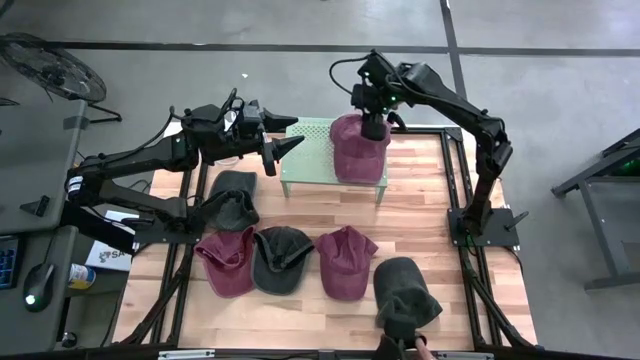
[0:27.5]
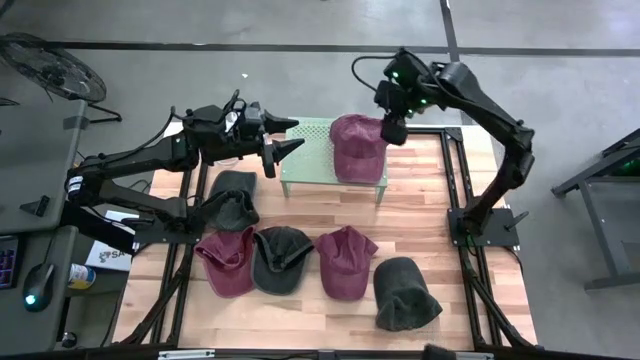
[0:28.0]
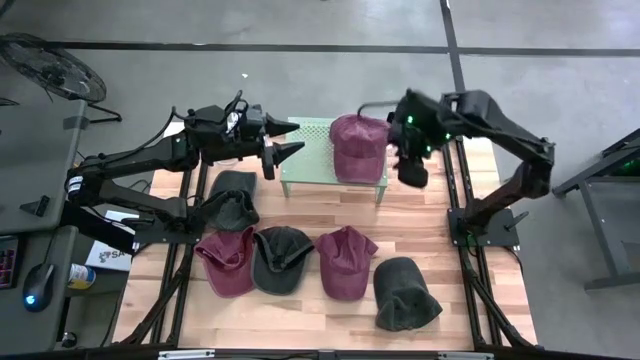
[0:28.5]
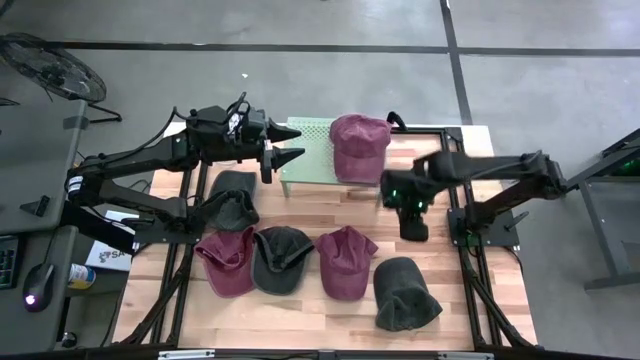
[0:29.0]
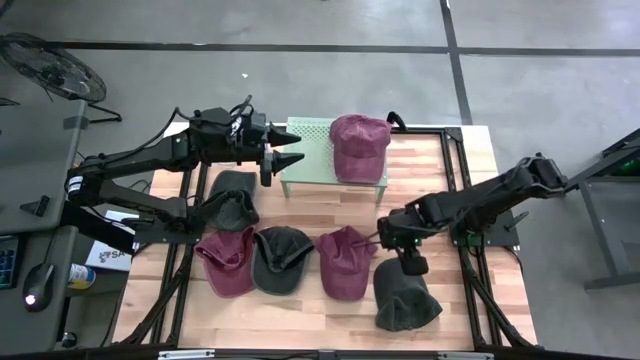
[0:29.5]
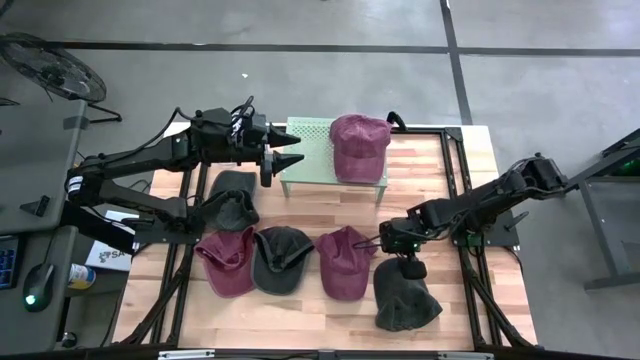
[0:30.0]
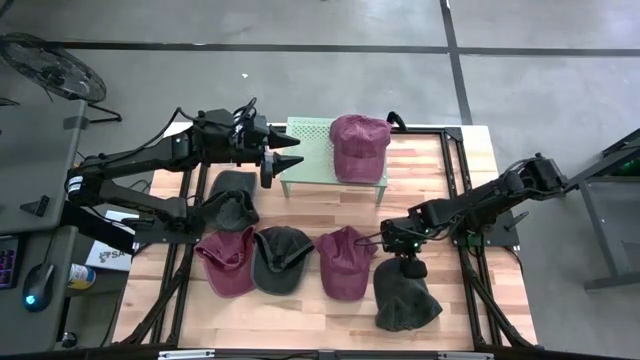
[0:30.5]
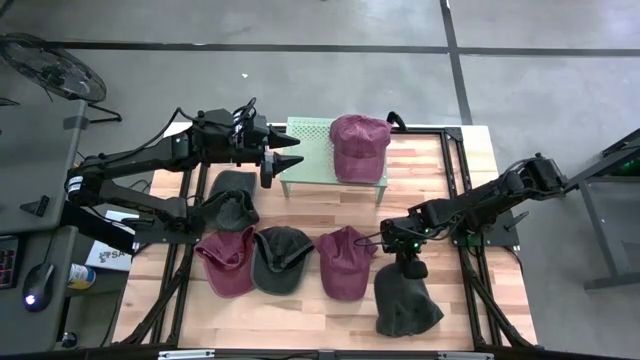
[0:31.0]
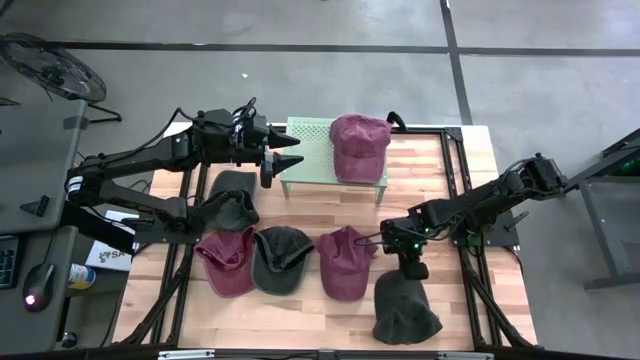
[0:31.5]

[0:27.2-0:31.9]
Task: Pick & Place hat
Put the bottom right black cap on the shelf

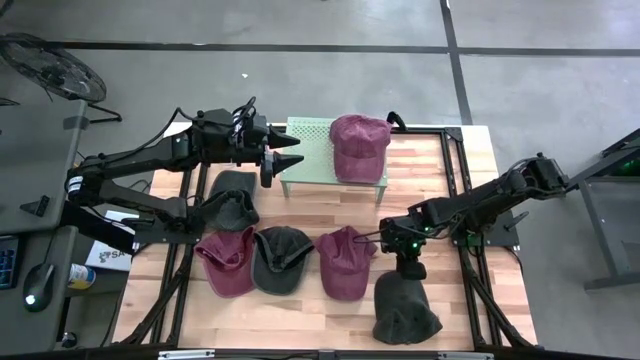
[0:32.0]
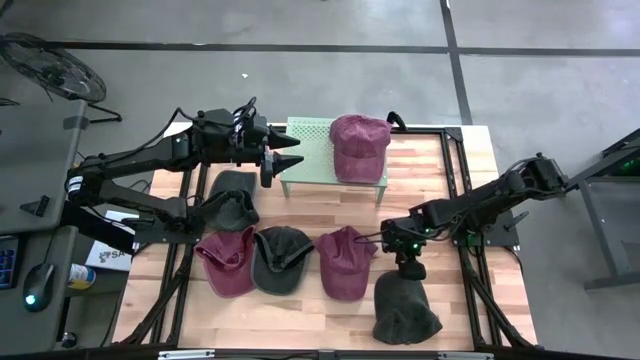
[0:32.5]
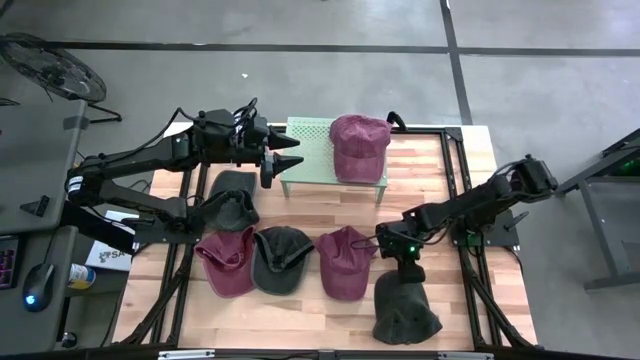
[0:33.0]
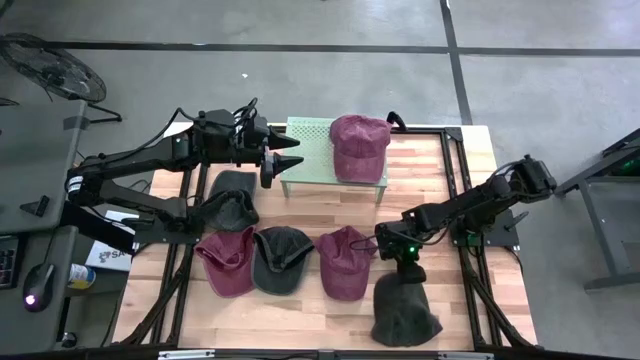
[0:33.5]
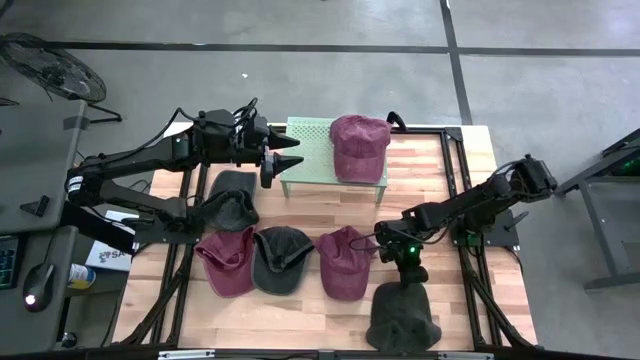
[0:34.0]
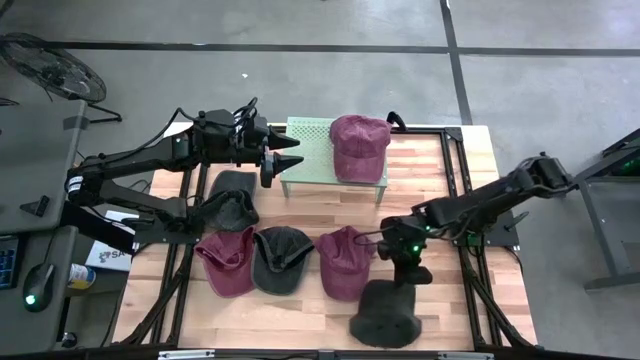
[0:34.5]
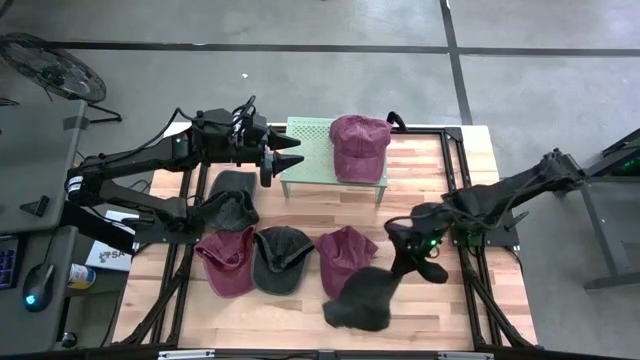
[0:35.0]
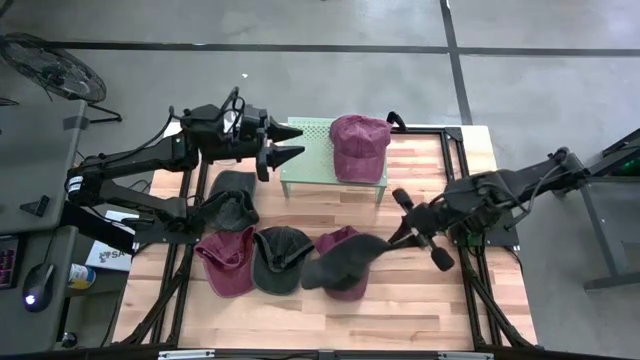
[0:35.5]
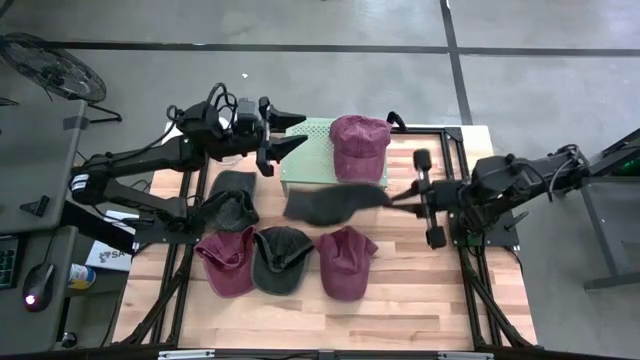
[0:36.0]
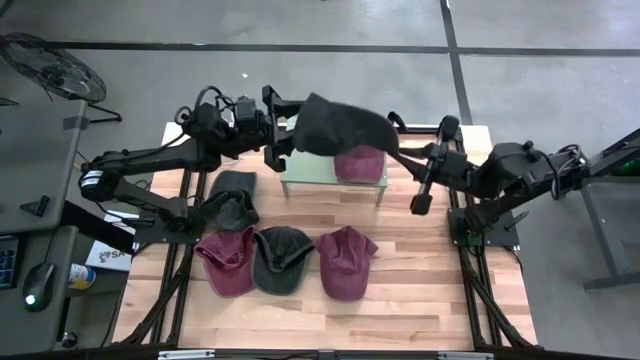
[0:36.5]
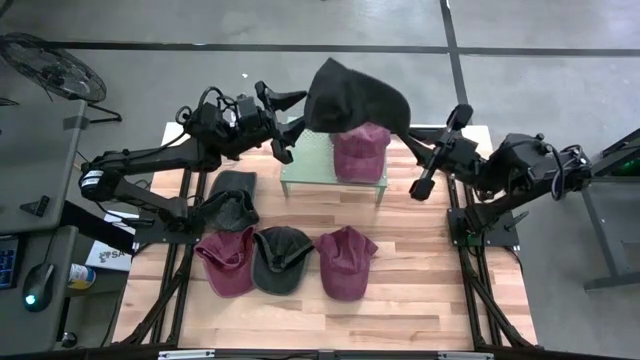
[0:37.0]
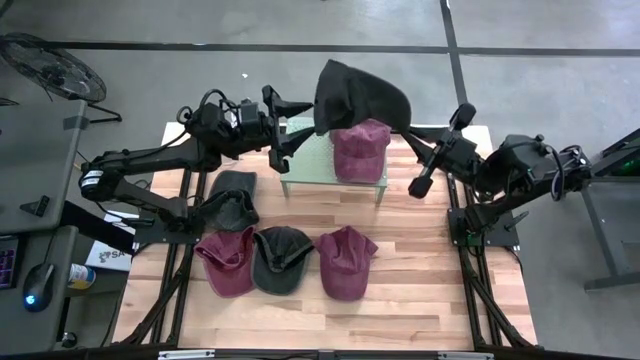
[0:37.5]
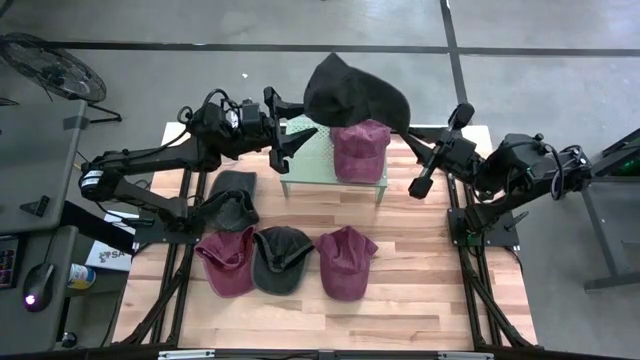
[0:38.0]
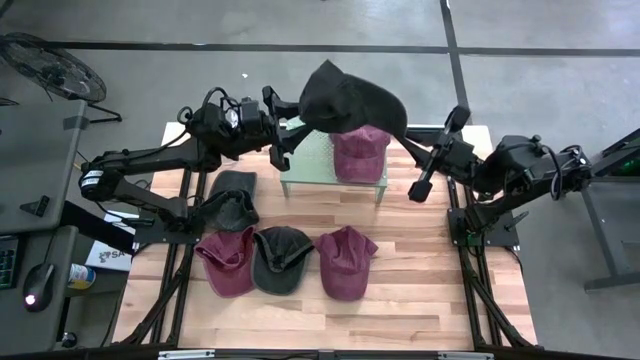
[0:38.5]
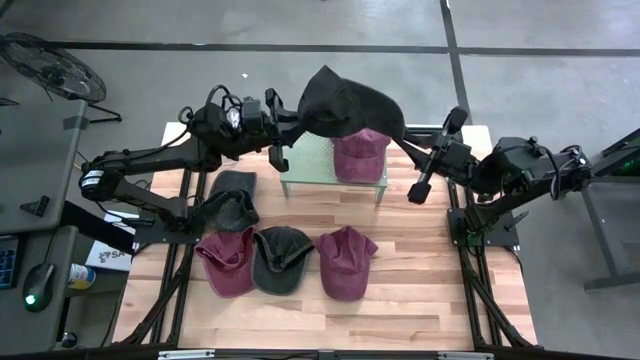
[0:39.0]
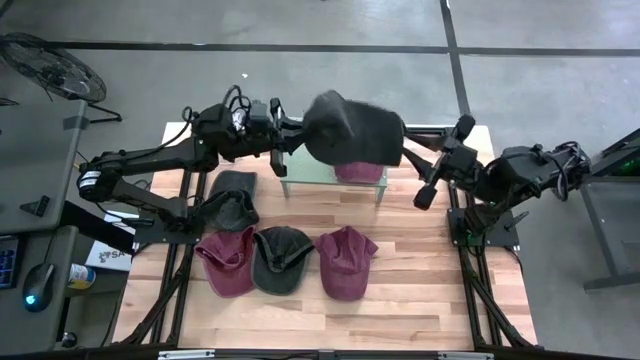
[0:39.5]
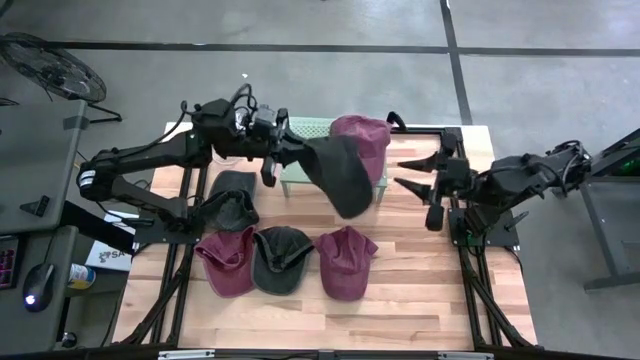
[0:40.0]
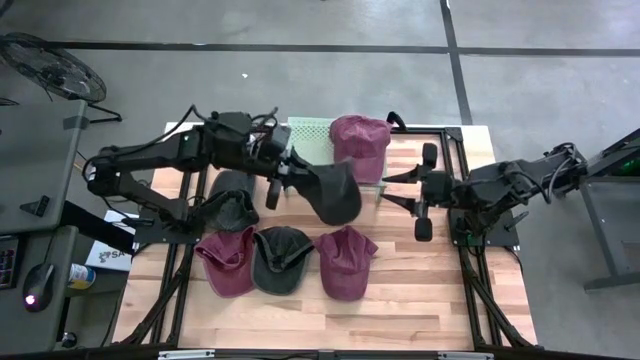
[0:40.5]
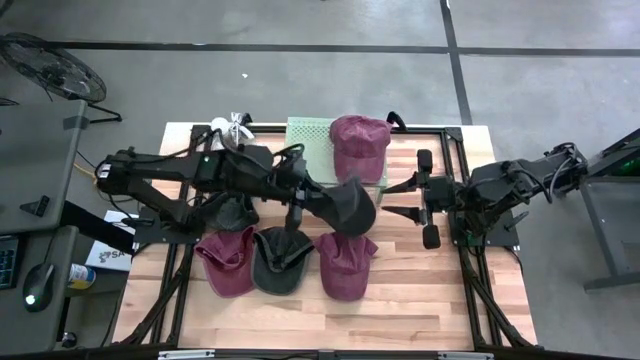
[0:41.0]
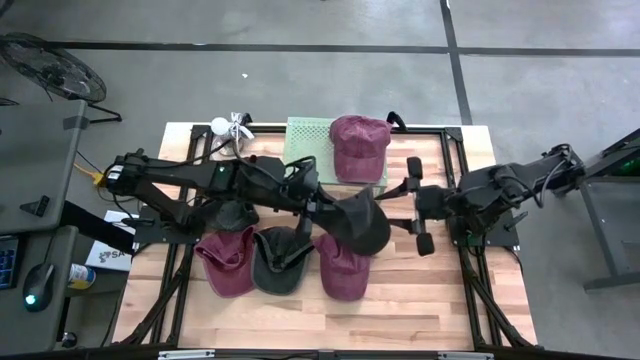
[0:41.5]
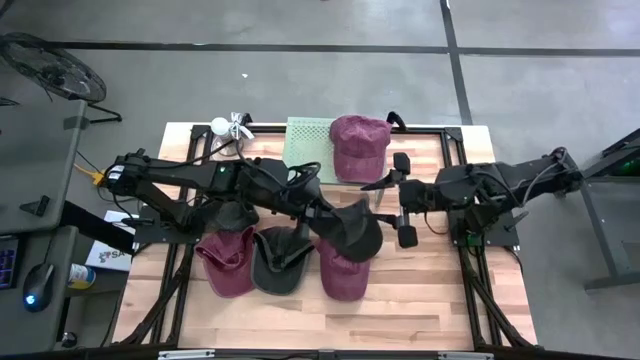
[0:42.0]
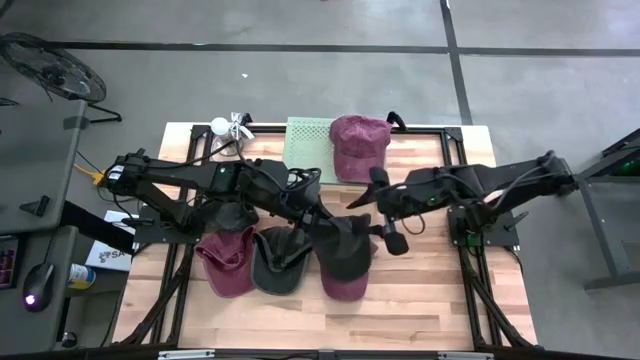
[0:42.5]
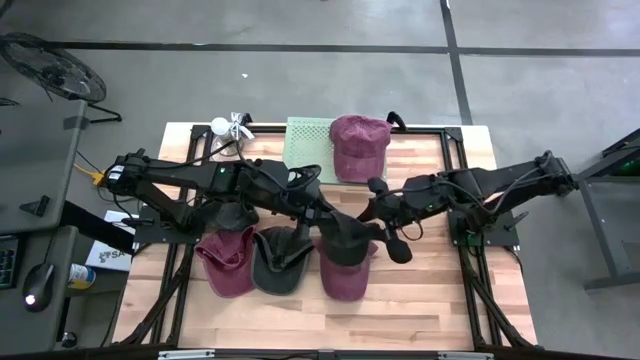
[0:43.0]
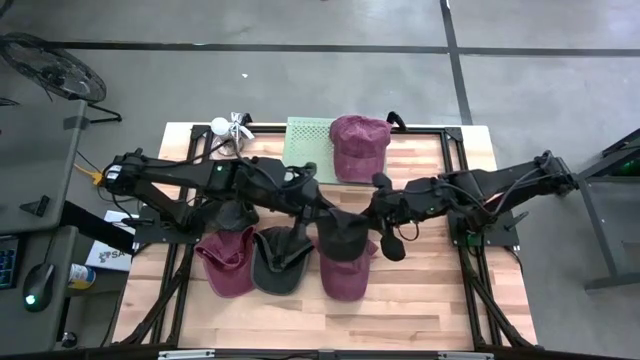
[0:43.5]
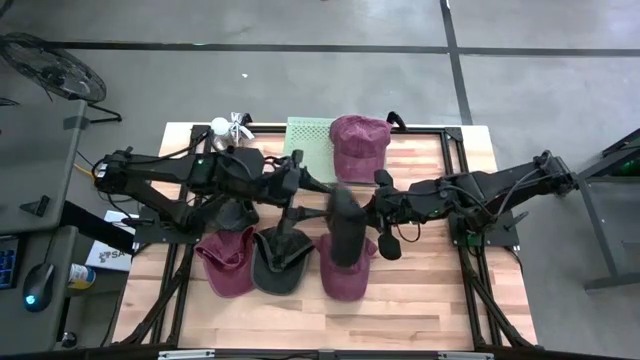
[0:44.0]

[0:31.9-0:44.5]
Put the bottom right black cap on the shelf
